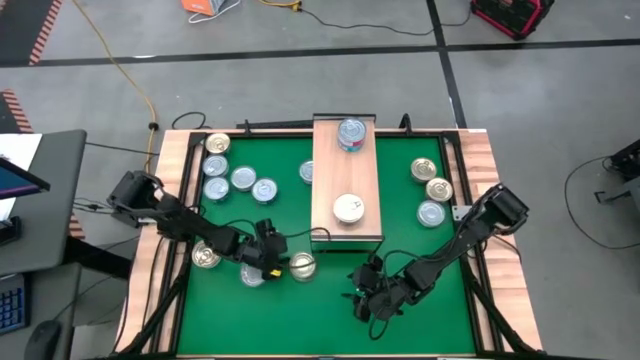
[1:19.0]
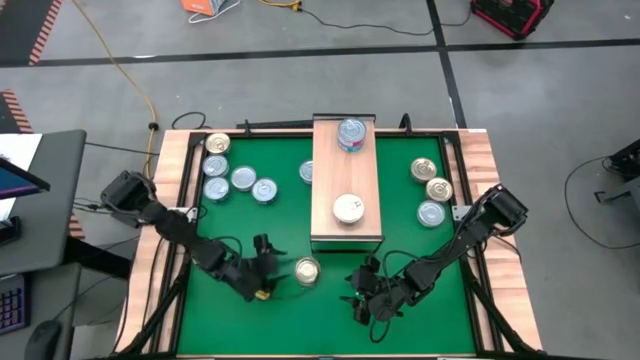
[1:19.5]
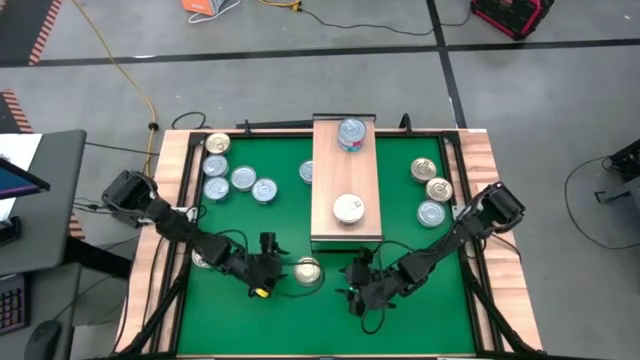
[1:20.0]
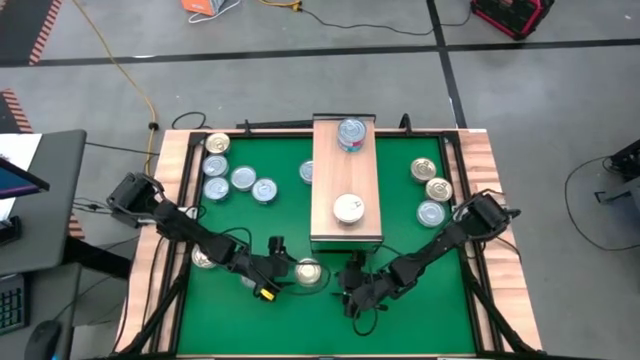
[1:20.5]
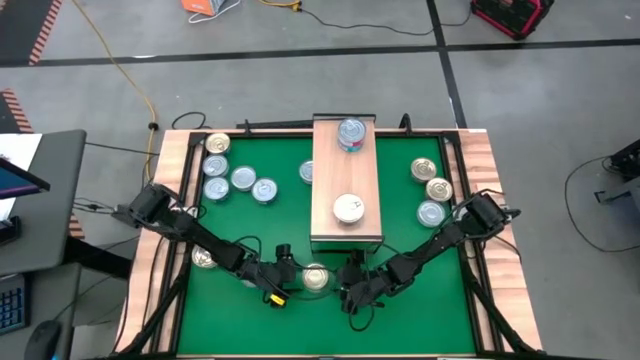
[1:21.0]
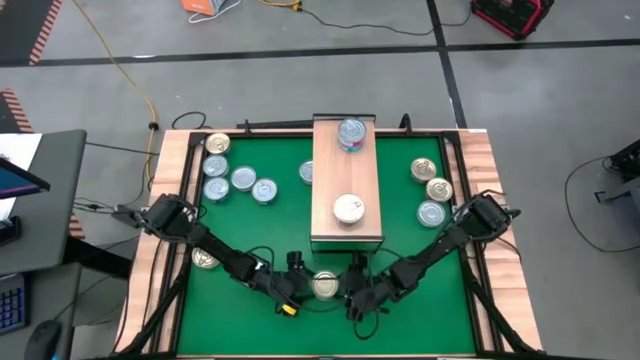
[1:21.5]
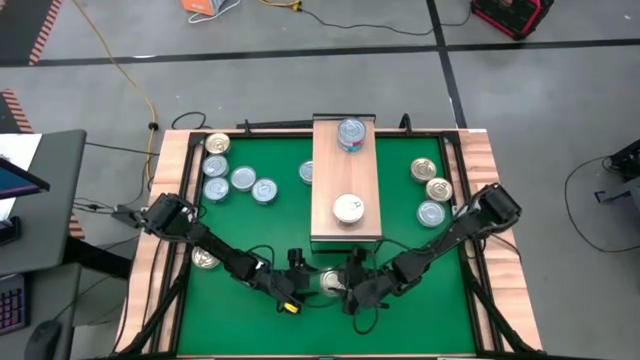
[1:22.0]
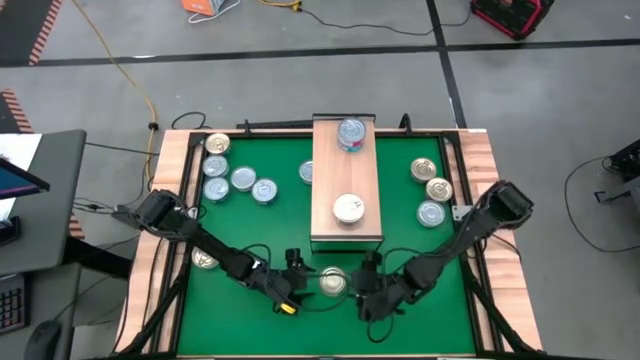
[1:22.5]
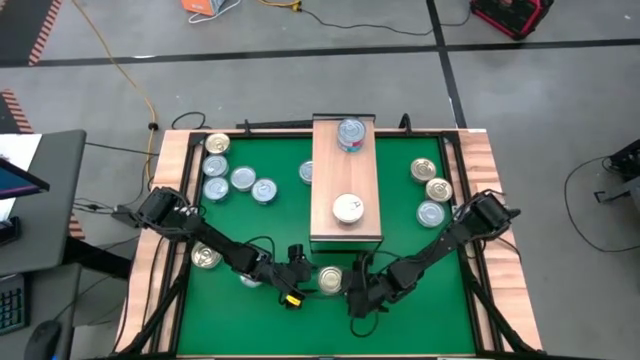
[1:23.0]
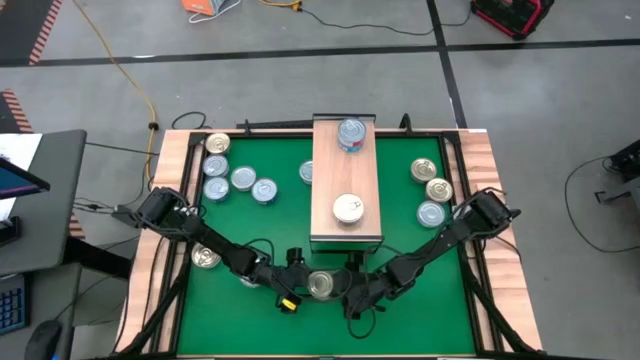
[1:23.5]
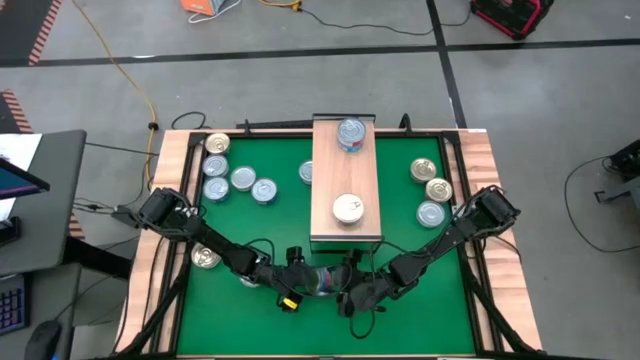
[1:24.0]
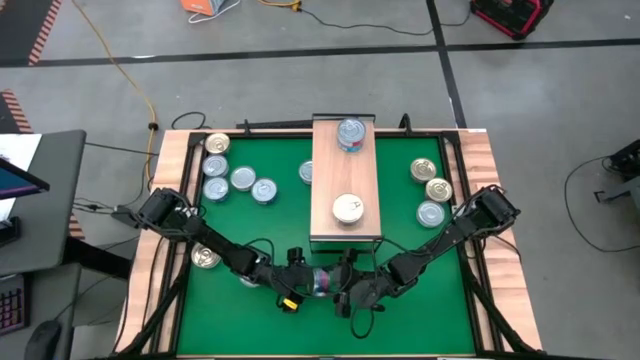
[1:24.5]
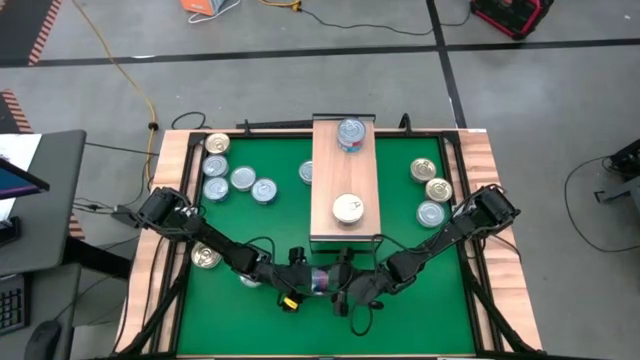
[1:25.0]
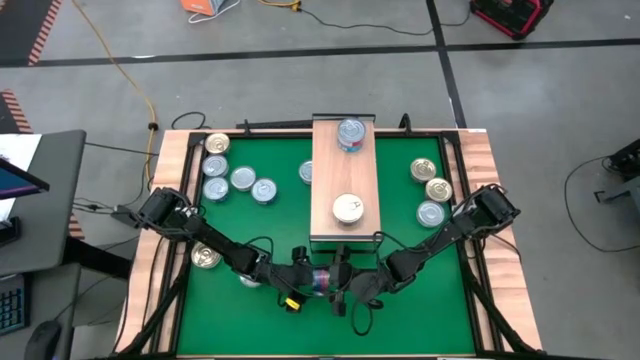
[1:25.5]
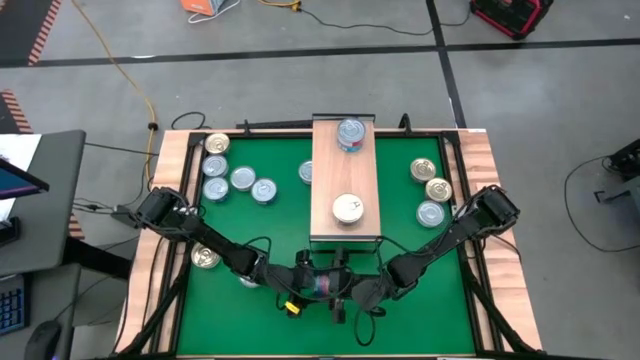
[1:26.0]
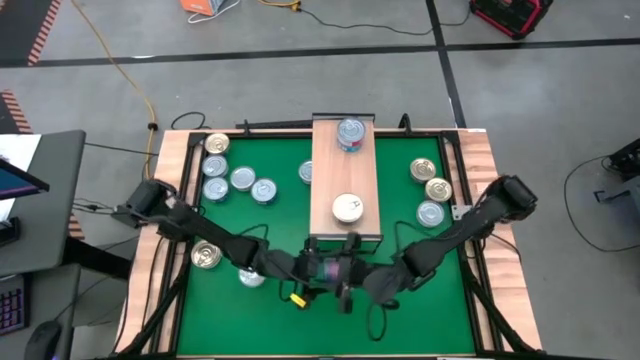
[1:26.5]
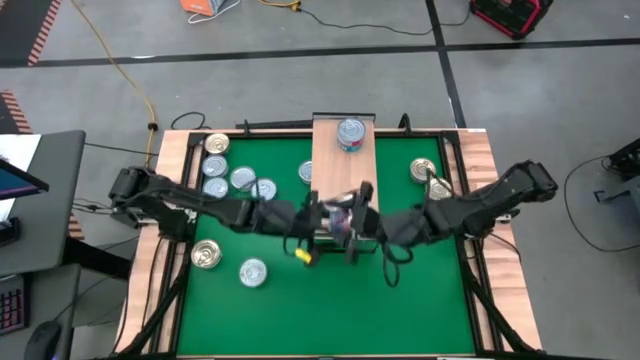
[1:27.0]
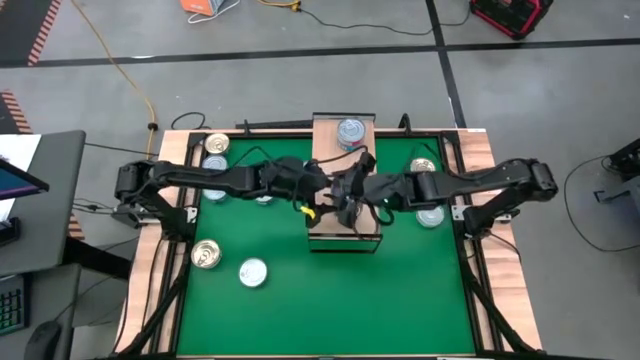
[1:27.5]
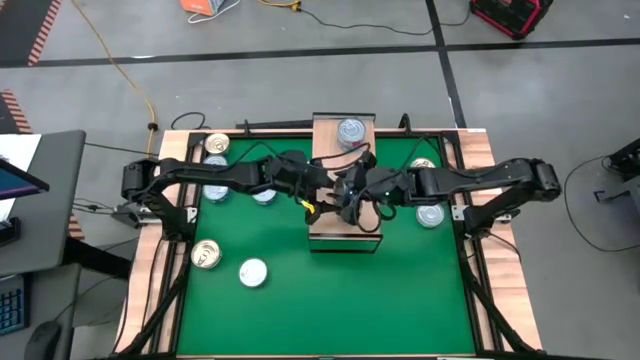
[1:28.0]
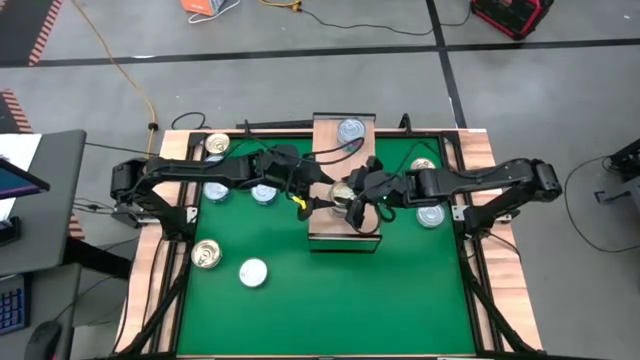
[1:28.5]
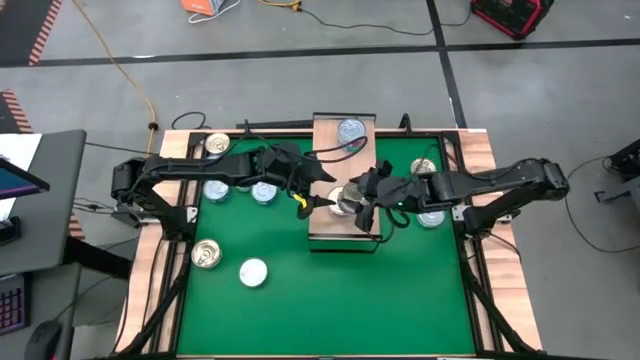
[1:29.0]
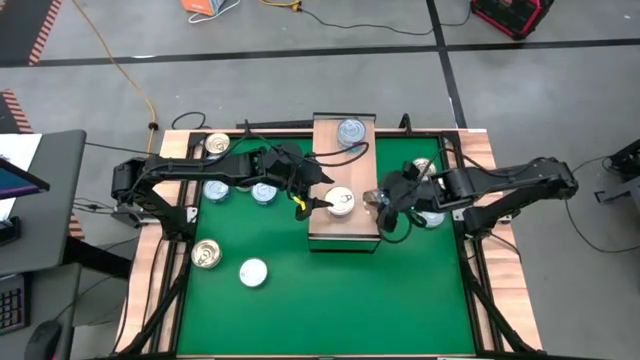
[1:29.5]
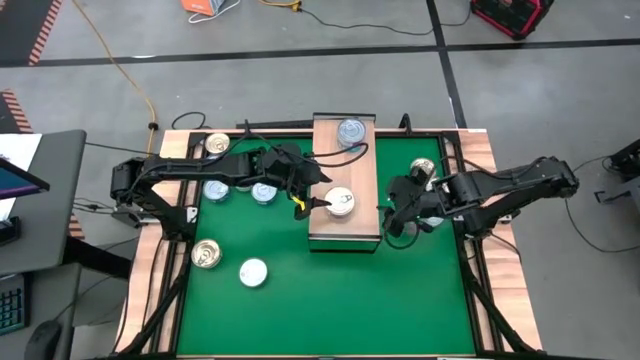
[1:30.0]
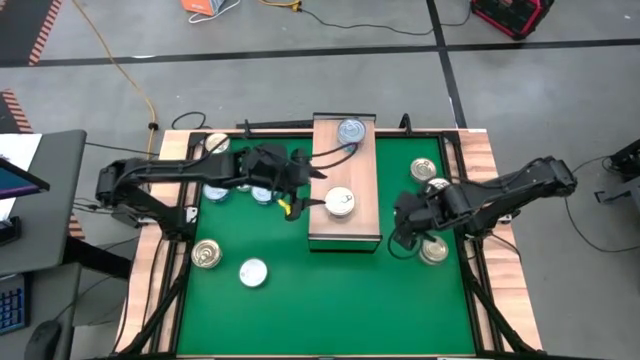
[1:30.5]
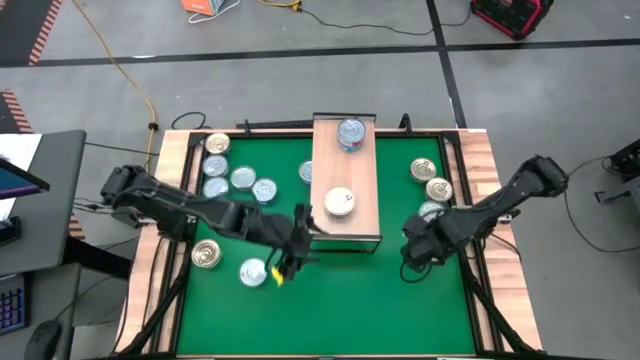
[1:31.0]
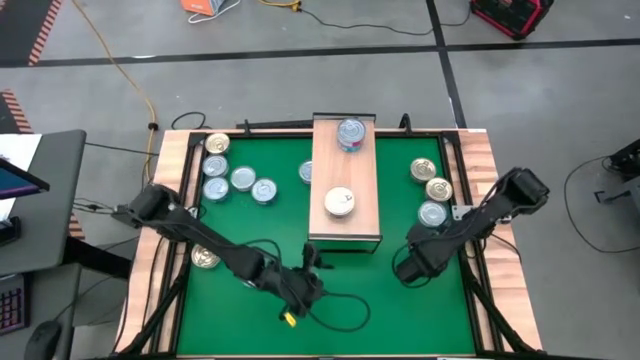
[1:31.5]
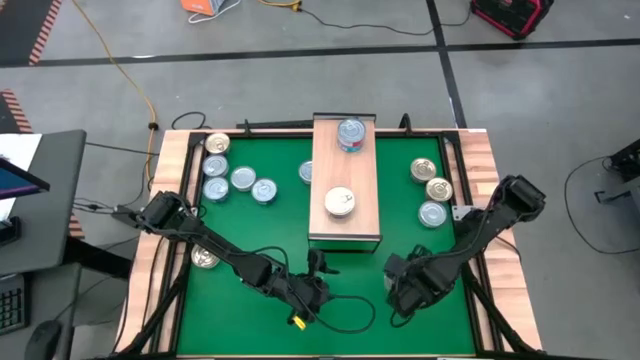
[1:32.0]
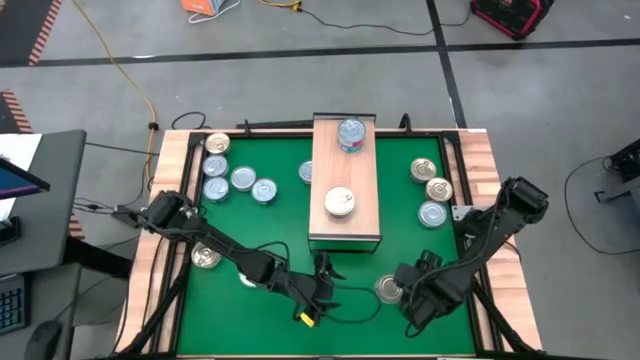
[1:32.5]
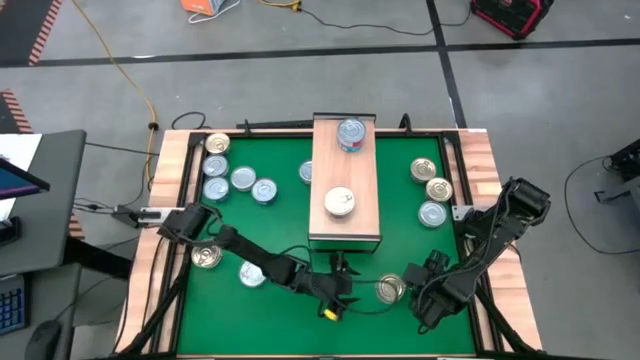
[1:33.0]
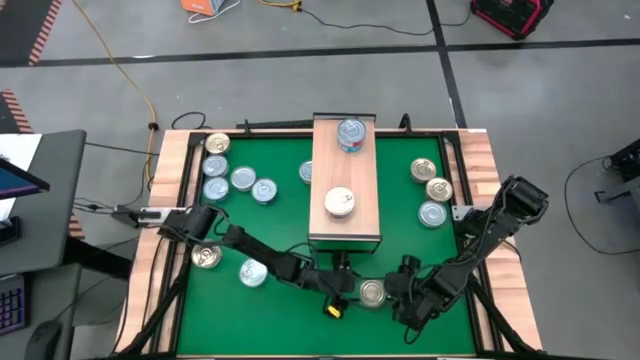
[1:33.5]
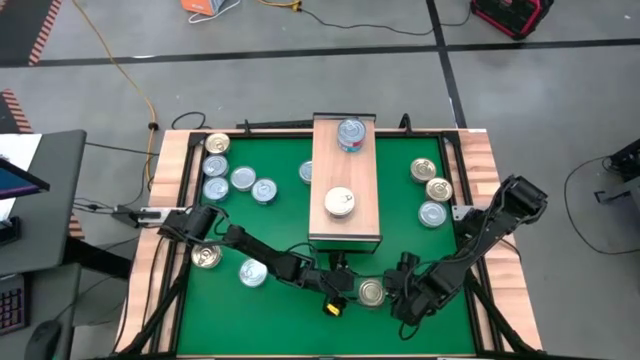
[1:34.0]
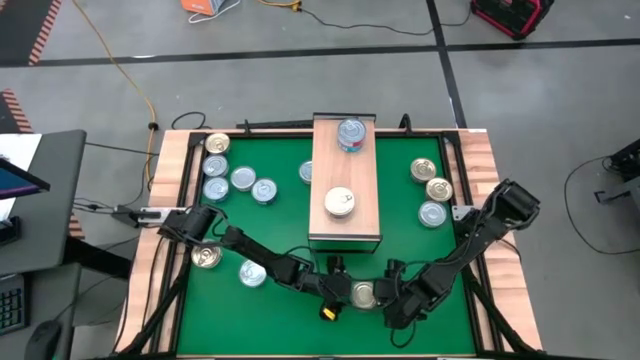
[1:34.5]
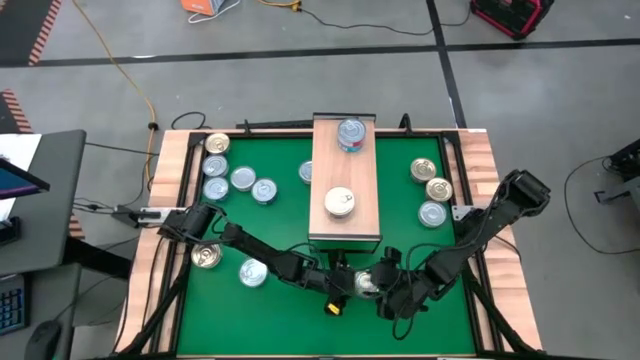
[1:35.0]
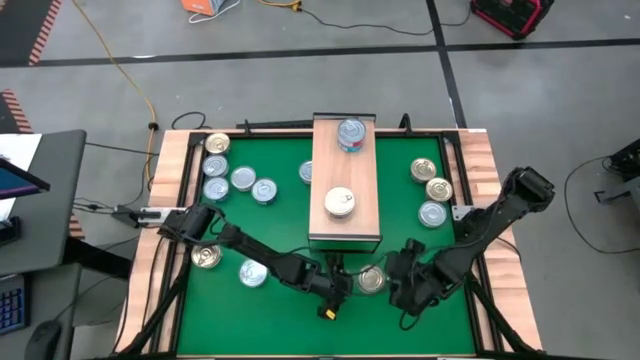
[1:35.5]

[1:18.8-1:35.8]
Task: Stack canned seafood by type on shelf
Stack the blue tuna can on top of the blue tuna can on the shelf
